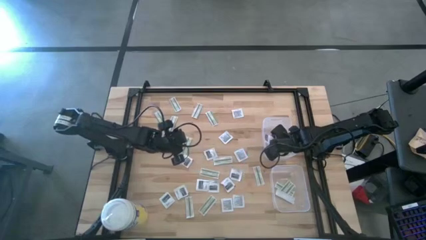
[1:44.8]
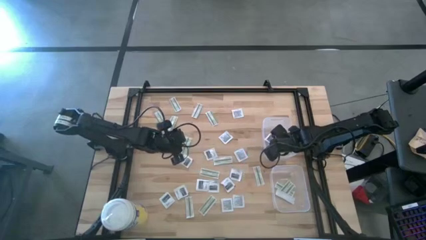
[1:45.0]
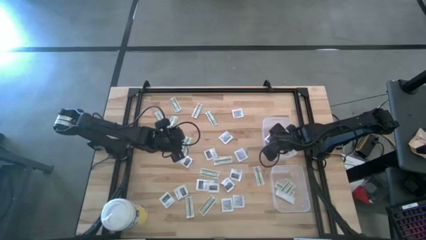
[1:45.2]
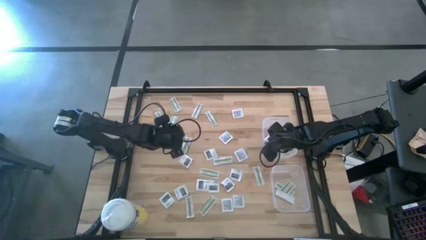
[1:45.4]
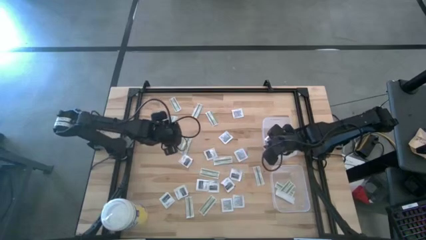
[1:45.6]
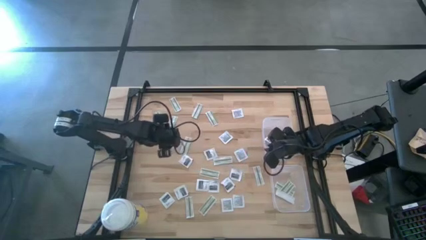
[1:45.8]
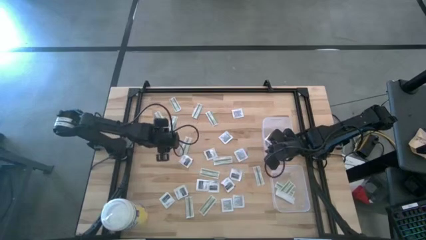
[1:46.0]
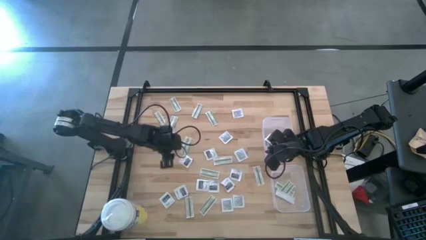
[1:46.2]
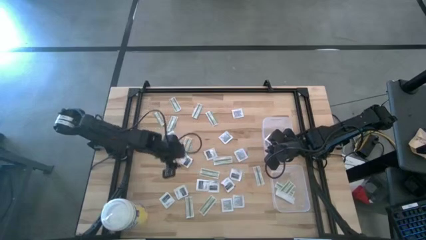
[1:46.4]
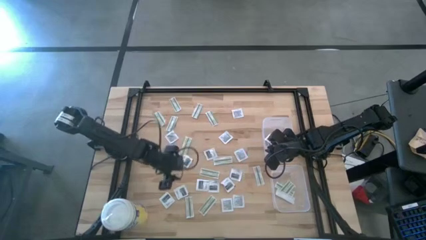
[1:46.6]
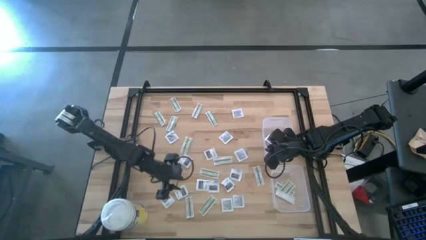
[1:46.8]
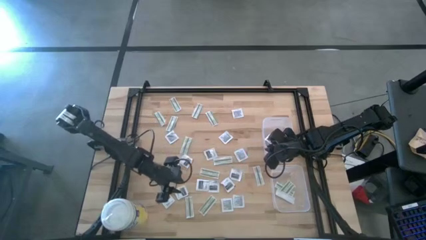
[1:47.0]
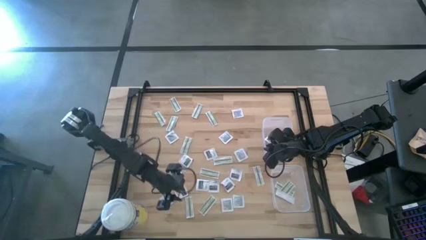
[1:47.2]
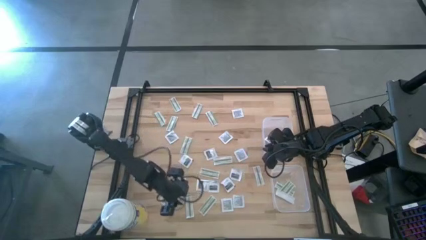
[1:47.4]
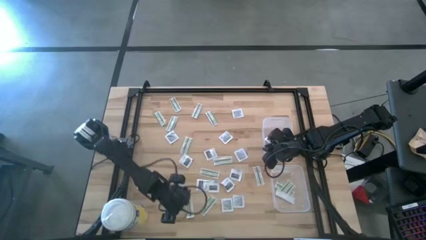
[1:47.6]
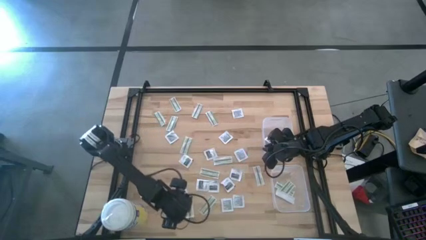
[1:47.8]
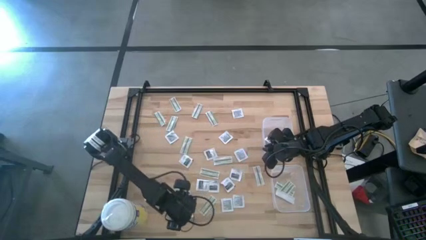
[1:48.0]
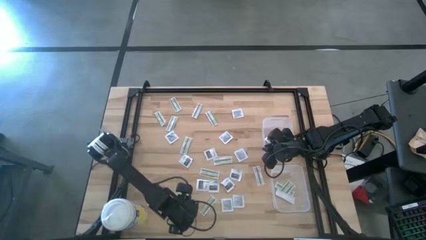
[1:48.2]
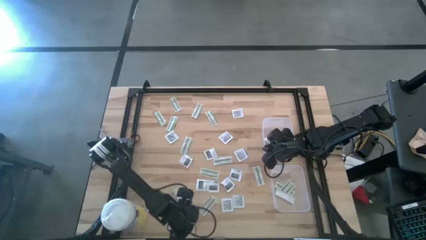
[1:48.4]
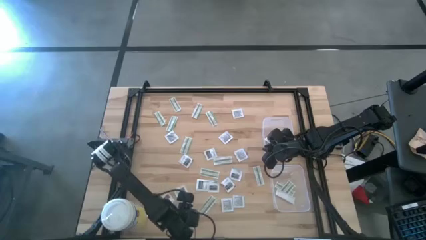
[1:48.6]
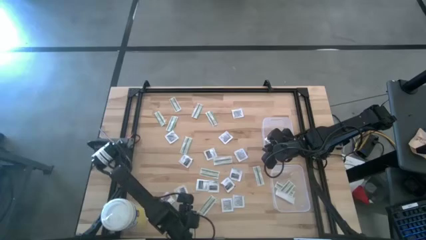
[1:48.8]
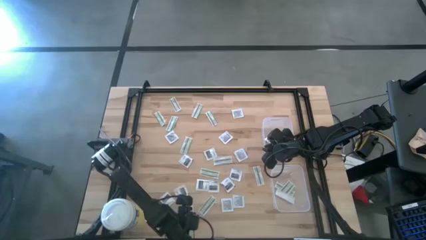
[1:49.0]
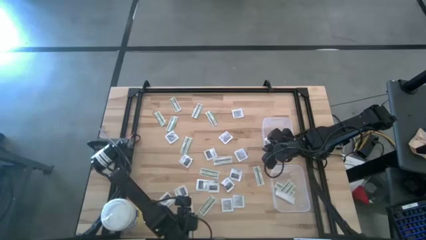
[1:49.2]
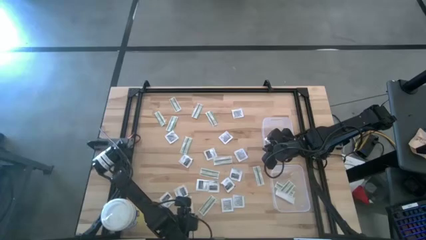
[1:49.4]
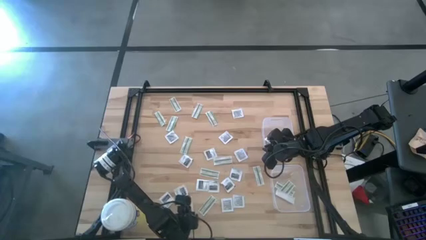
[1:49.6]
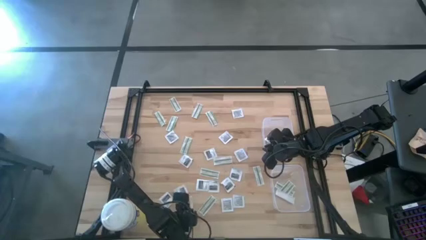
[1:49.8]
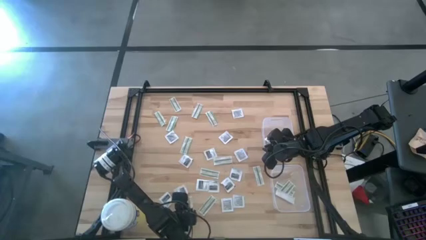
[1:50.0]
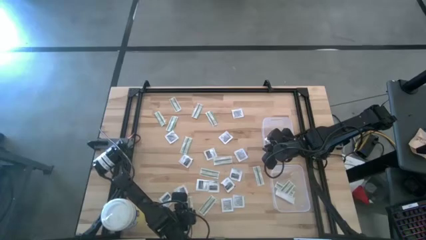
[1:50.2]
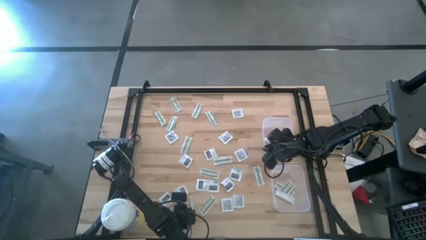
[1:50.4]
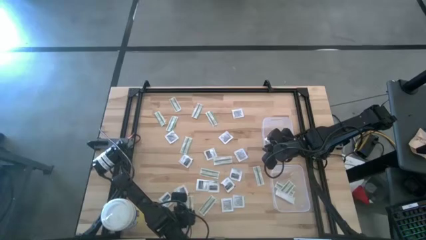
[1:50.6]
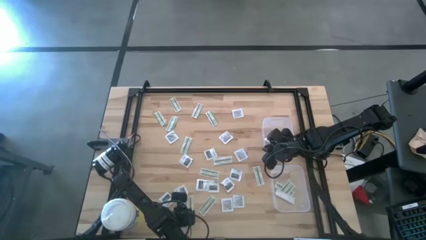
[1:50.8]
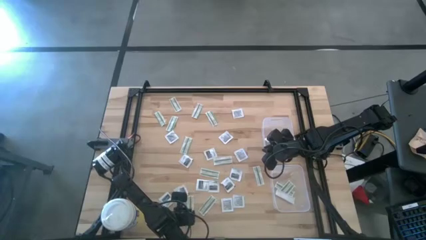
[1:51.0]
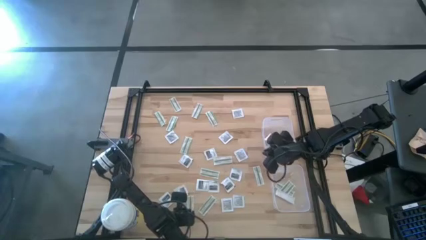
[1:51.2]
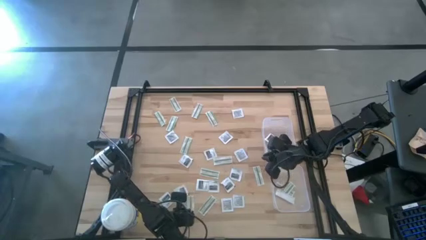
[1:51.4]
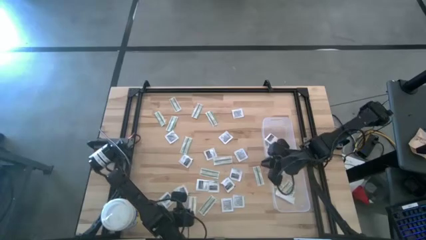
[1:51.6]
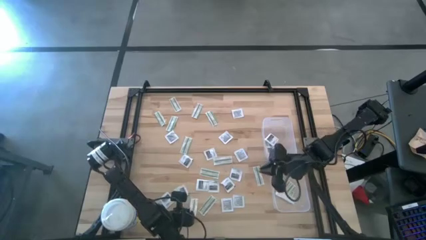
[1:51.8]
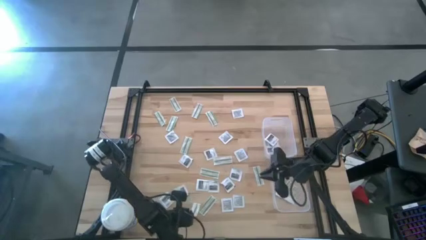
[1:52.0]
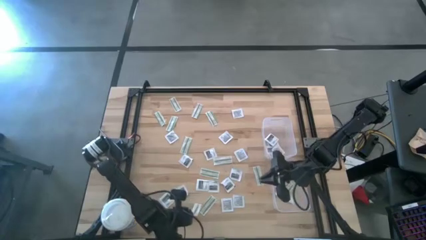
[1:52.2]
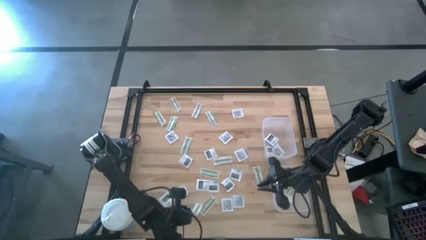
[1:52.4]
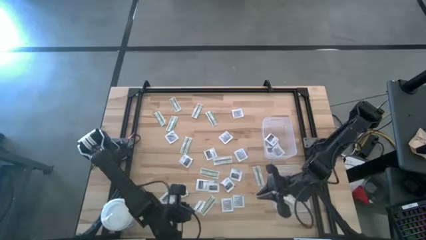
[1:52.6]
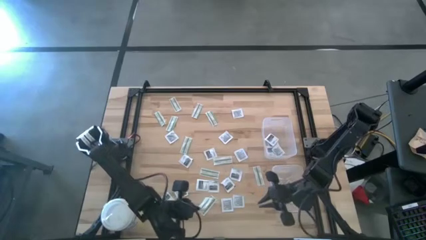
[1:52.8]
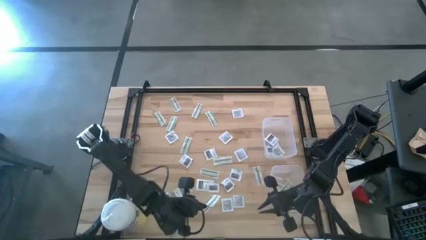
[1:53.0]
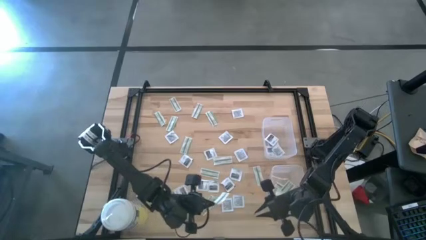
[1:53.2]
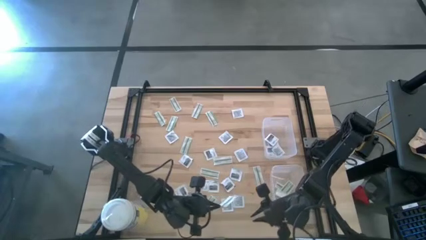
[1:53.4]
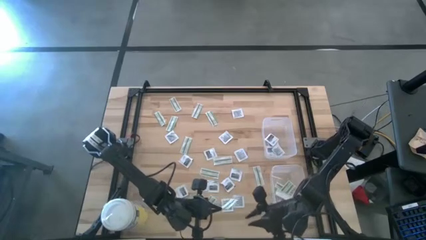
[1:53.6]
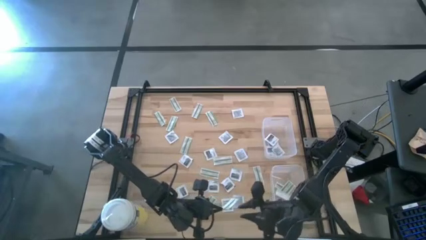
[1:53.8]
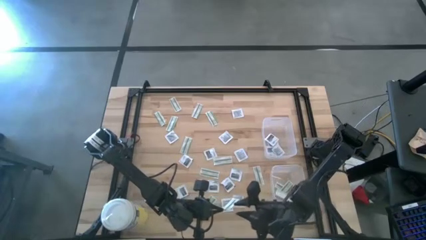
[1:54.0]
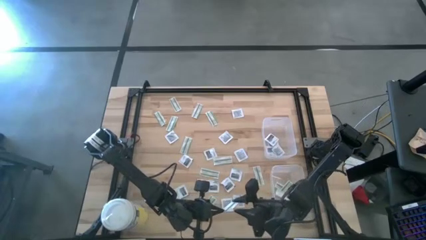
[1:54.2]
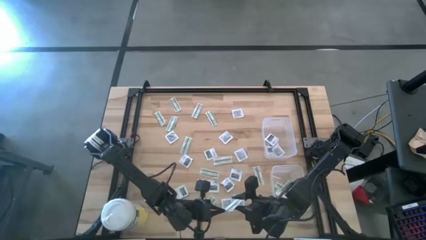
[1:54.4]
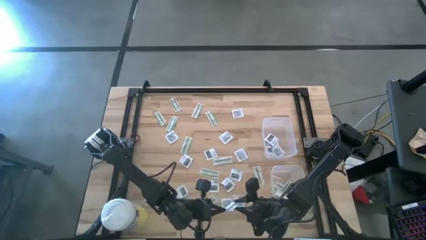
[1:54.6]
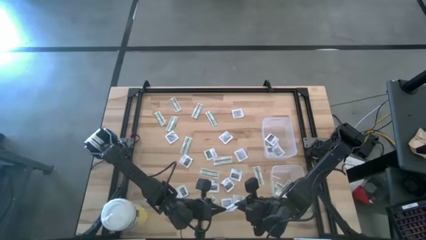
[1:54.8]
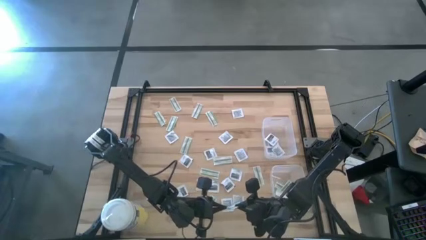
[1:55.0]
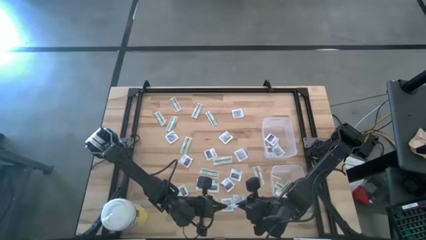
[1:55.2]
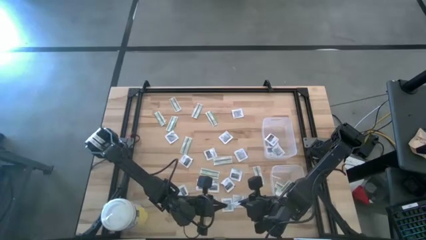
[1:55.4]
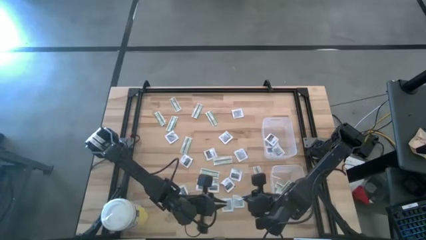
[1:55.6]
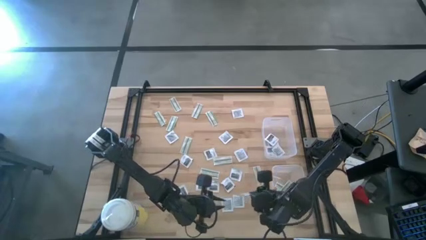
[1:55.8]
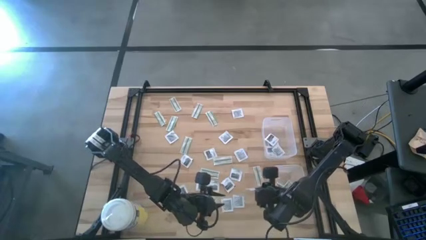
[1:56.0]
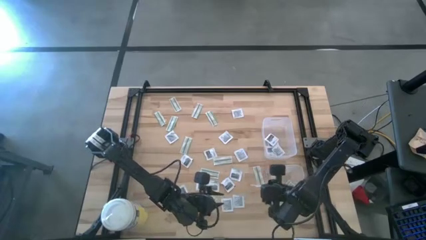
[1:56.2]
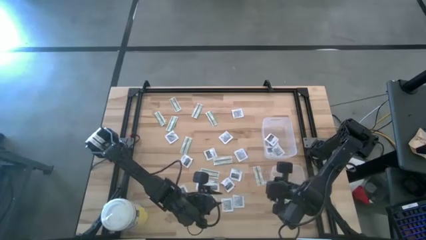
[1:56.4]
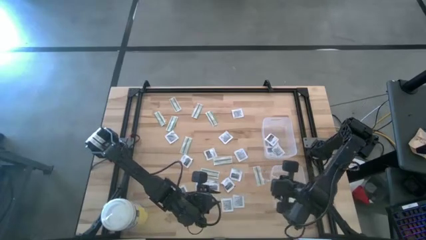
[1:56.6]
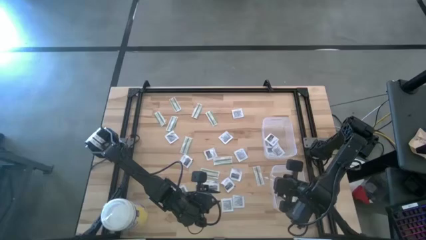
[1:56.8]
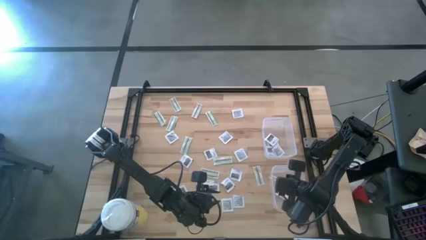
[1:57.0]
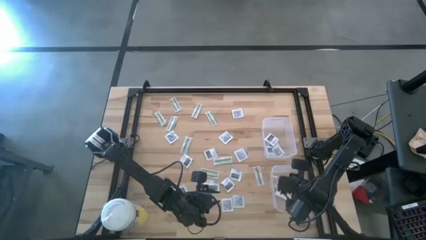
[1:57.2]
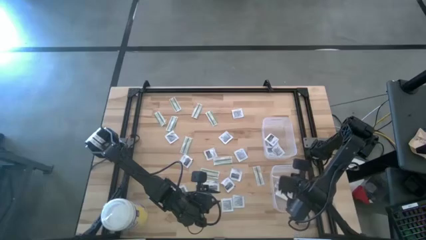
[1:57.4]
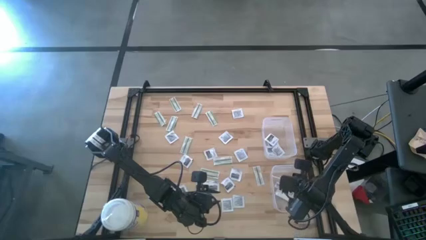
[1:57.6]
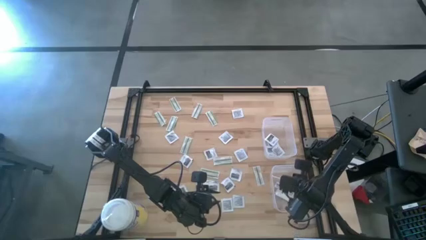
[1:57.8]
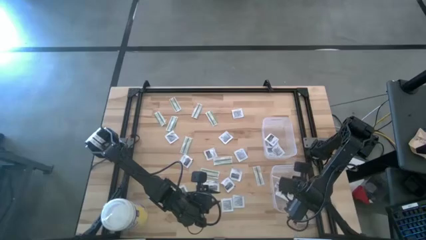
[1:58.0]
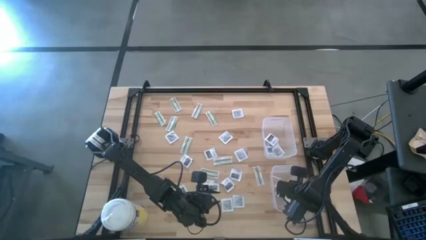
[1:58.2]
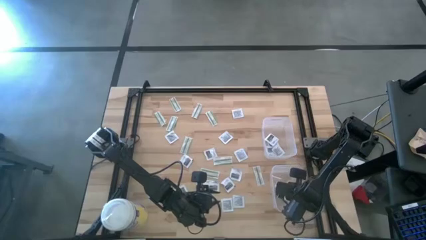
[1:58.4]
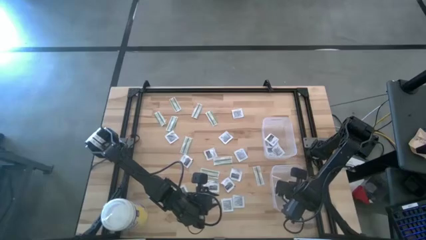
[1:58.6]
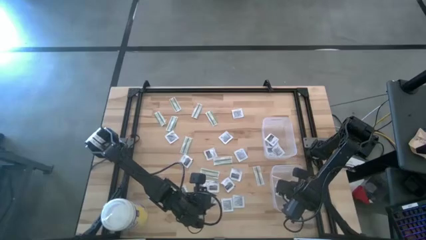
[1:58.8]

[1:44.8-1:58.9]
Task: Pick & Place First Aid Supplies
Put the bandage pack into the bottom bin
